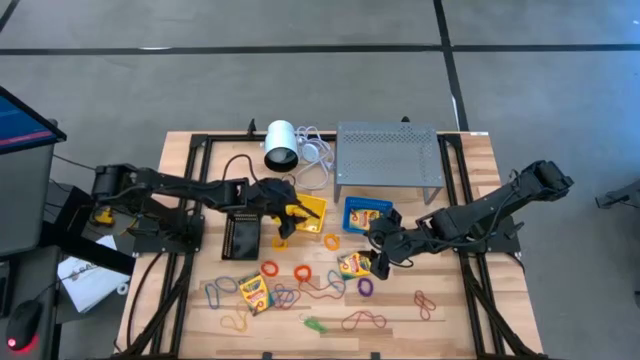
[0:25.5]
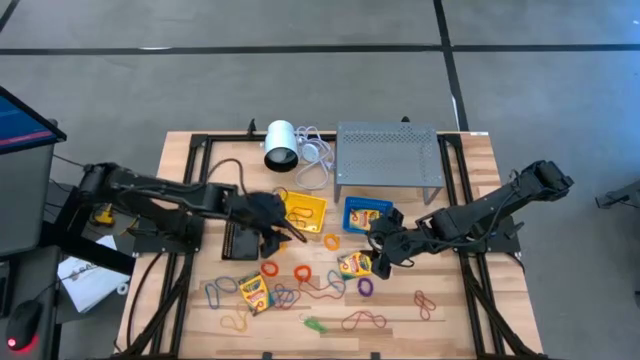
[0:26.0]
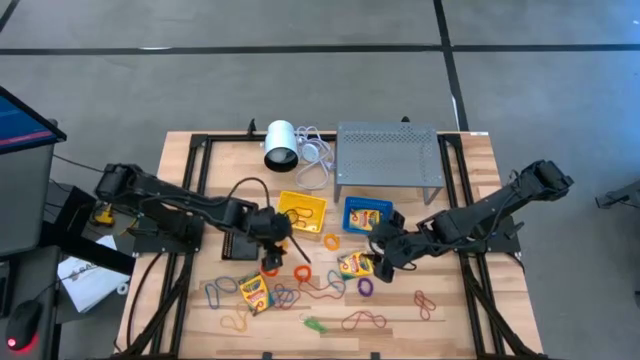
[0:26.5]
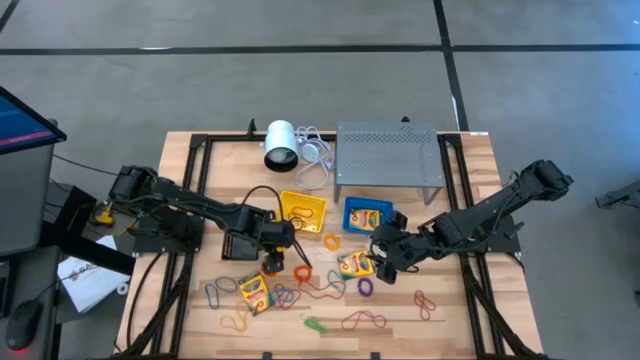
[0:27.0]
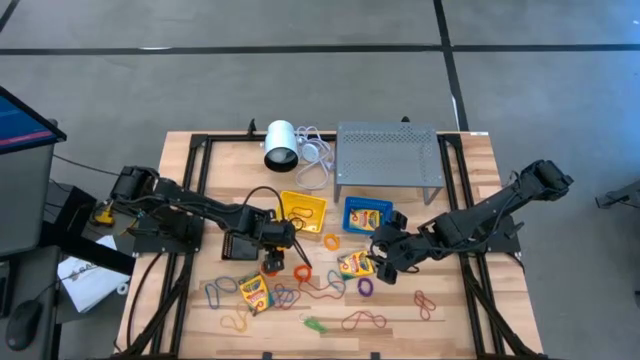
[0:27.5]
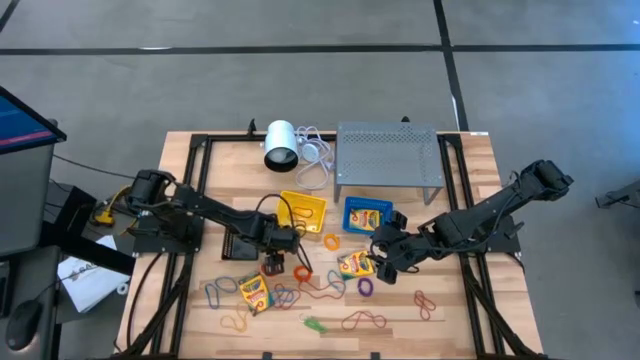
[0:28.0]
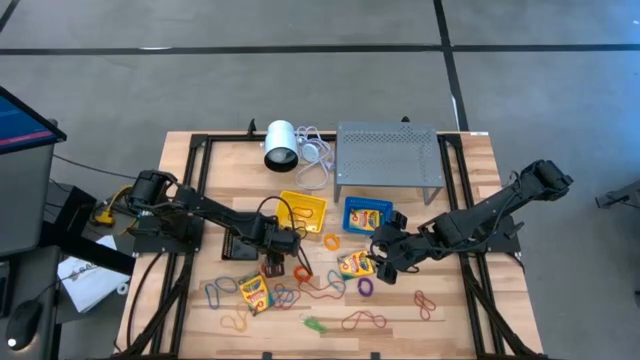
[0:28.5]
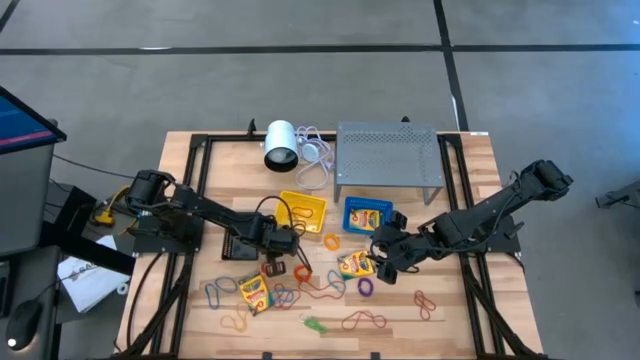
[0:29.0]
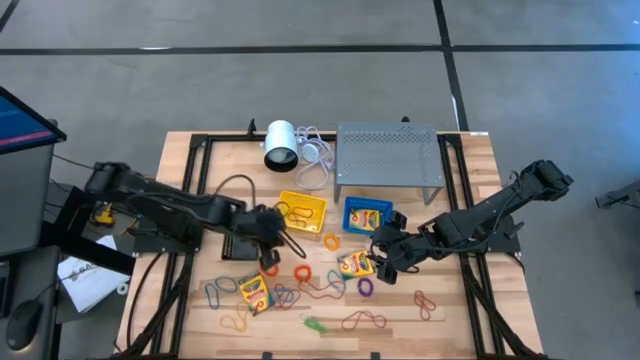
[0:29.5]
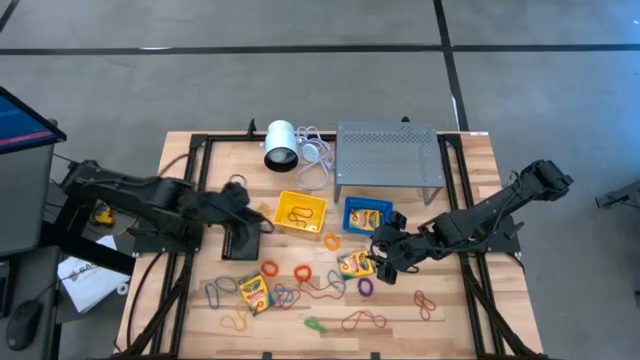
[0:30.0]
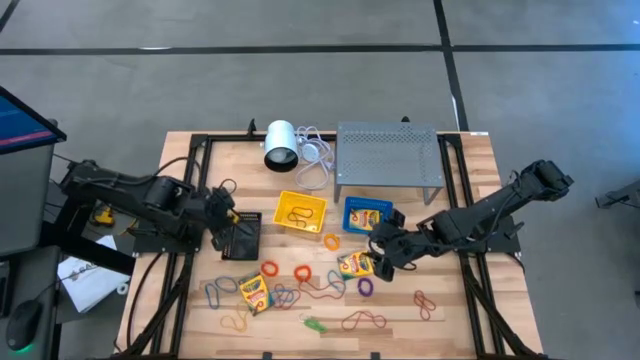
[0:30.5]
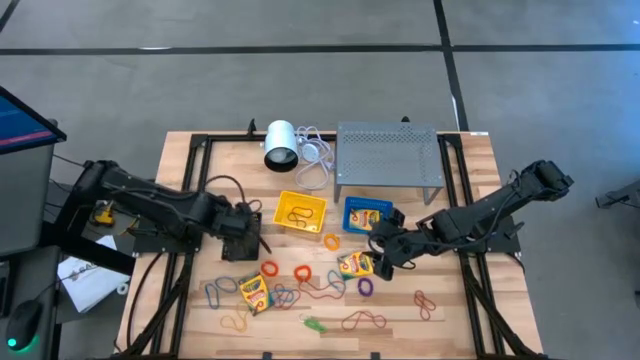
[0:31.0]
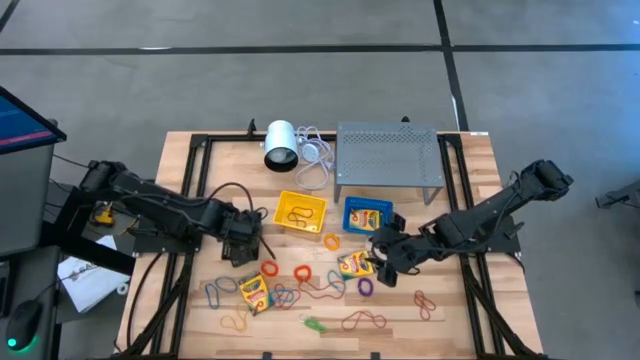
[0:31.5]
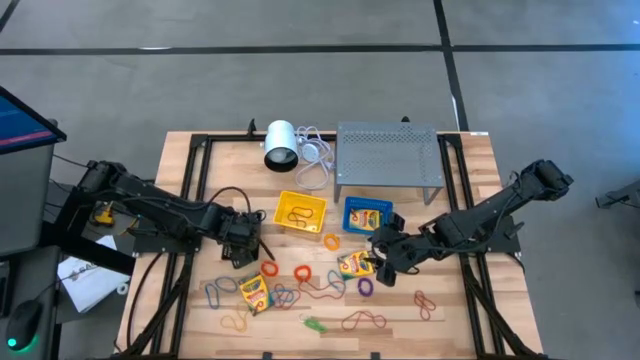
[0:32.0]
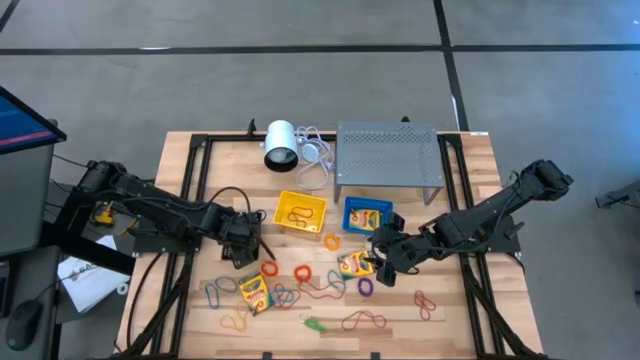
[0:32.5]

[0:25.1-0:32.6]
Task: Pick & Place Office Desk Supplies
Put the right yellow spring keychain into the black bin

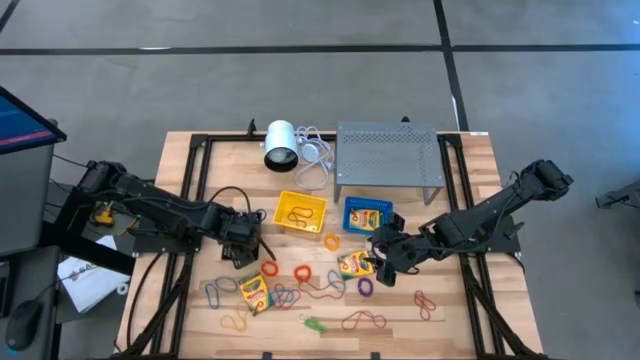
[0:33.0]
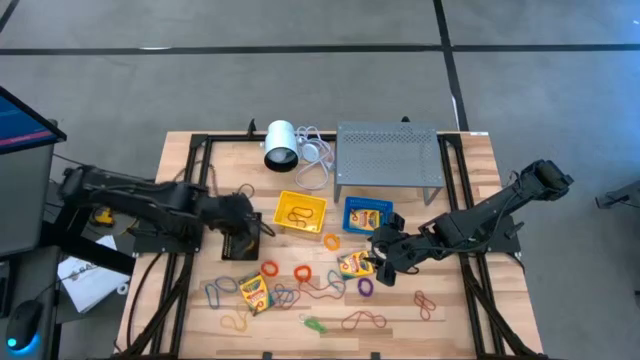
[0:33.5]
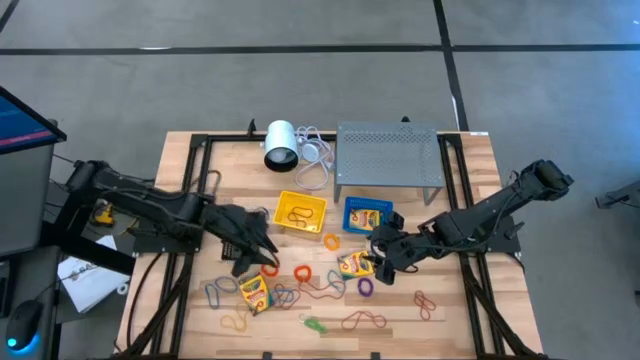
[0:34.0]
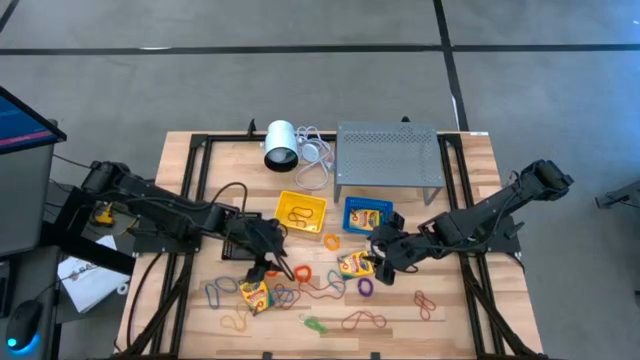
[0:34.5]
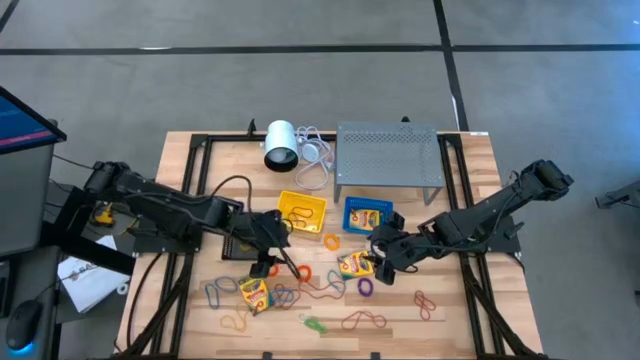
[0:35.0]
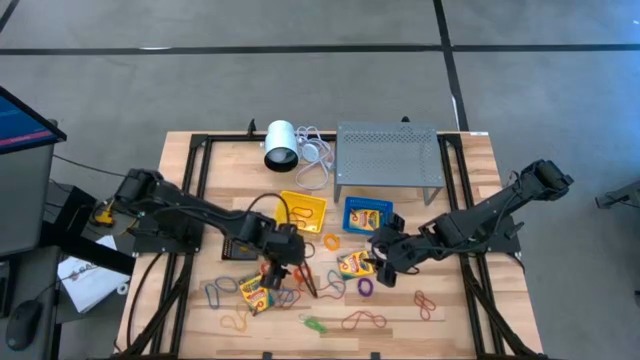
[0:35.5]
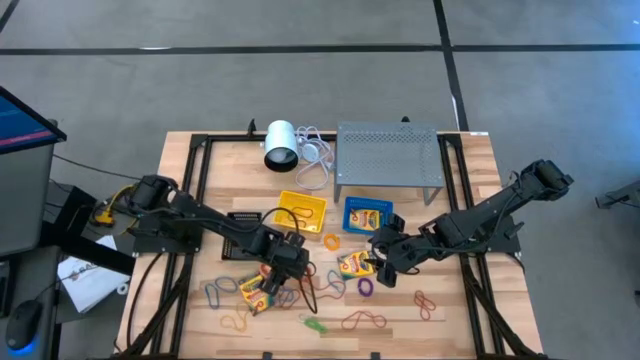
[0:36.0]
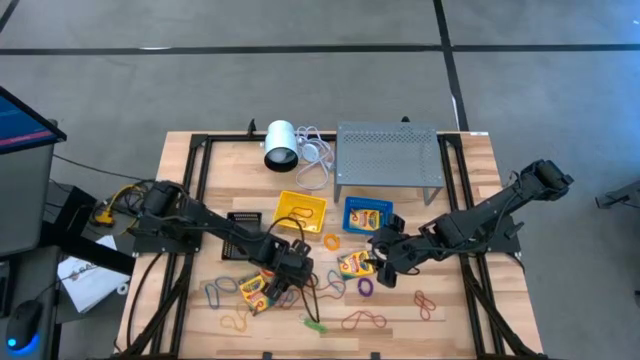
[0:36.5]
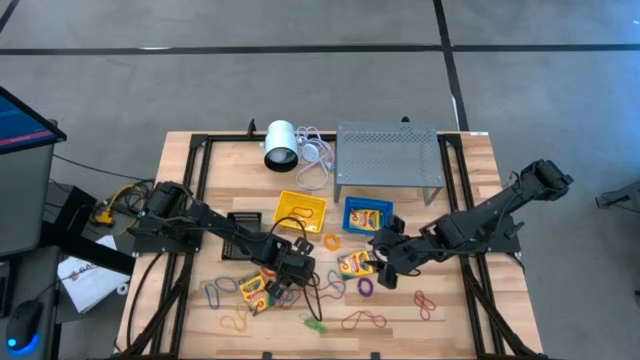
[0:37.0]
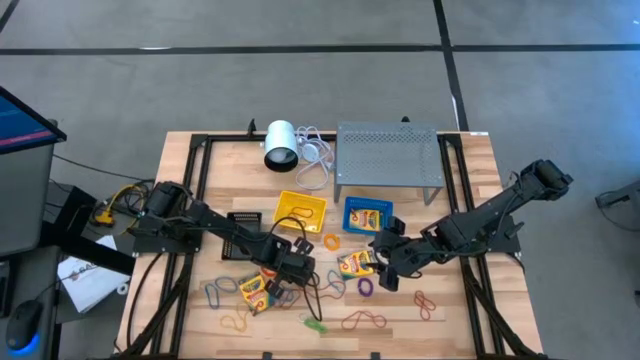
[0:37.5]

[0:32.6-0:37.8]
Put the right orange spring keychain into the black bin

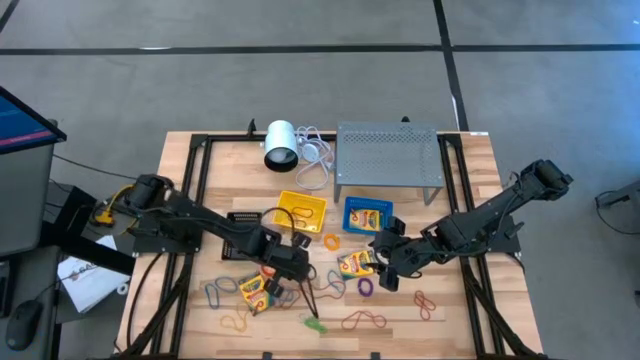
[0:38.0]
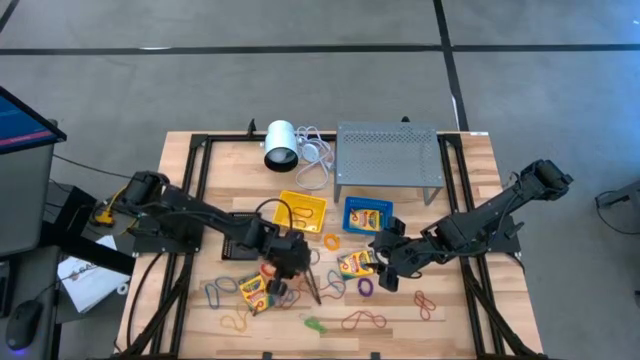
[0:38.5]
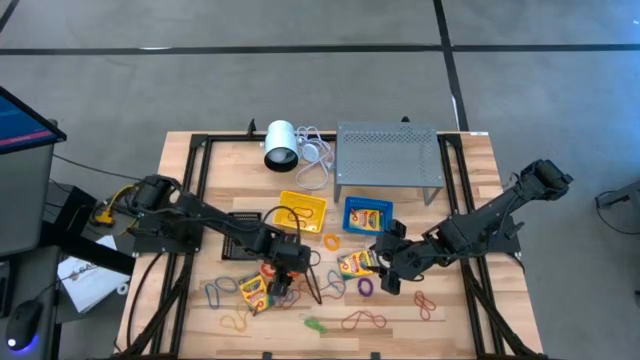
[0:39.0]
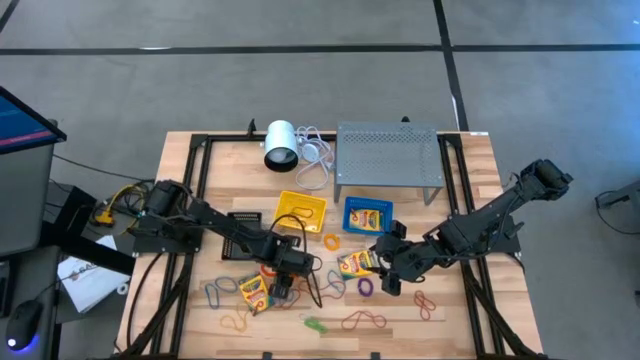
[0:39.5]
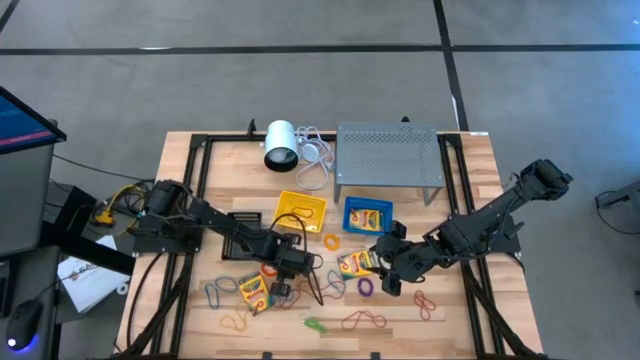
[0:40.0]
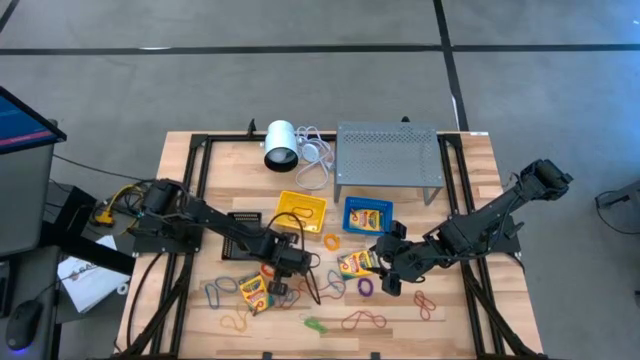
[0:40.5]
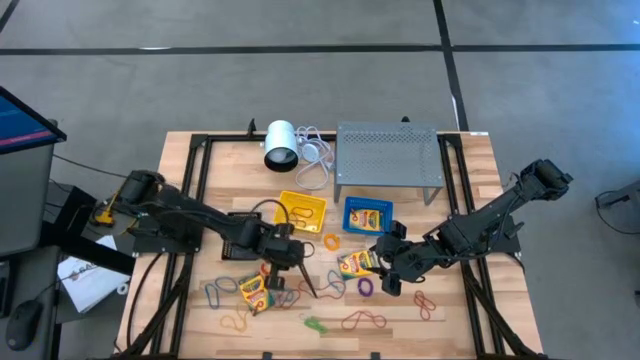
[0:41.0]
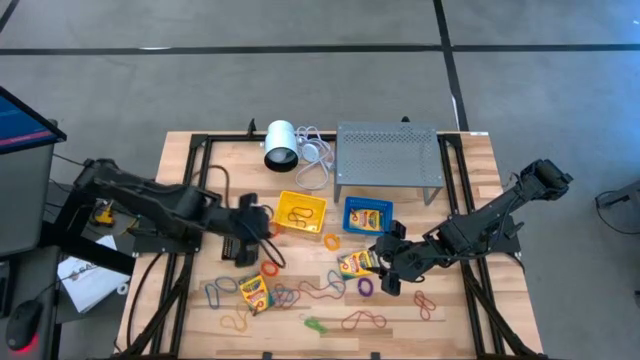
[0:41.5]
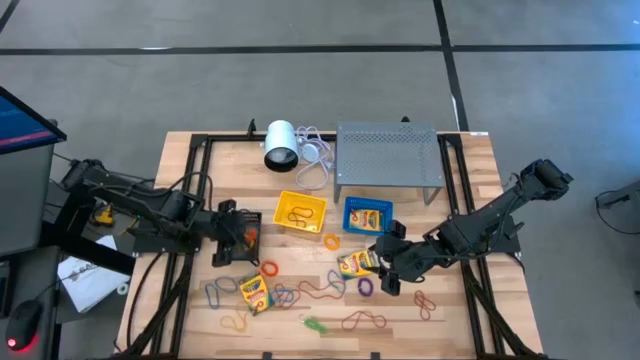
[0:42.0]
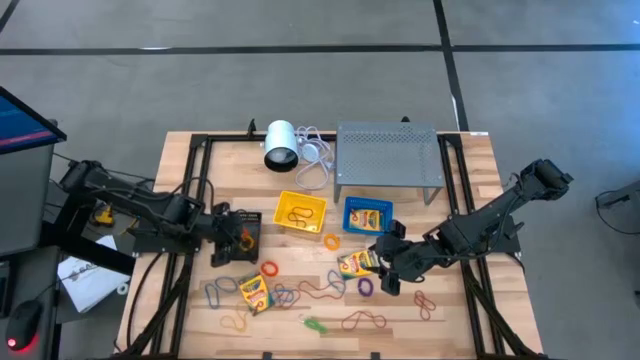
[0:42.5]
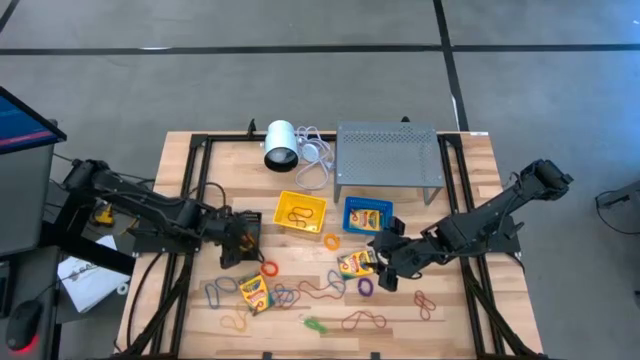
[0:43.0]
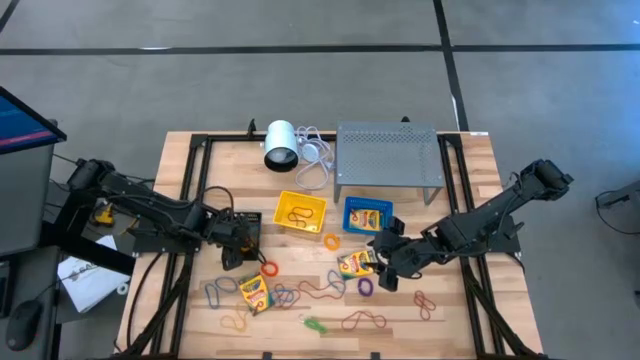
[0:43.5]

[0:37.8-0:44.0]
Put the right orange spring keychain into the black bin

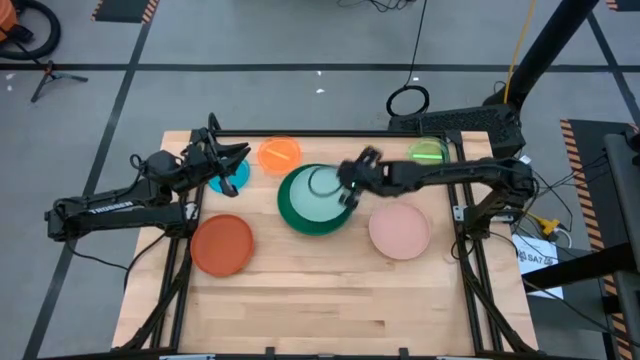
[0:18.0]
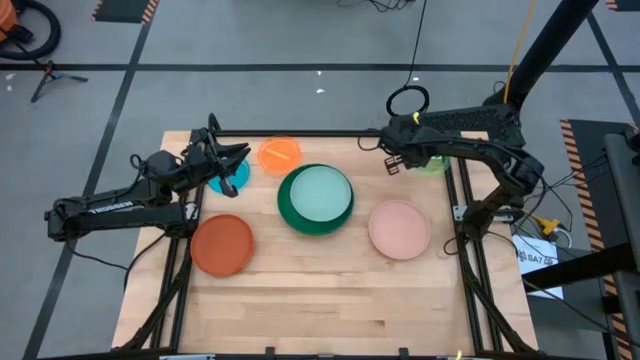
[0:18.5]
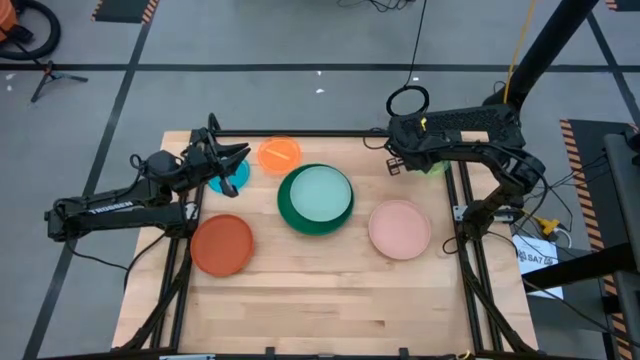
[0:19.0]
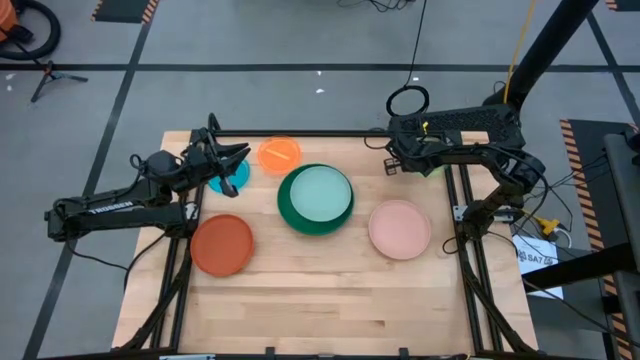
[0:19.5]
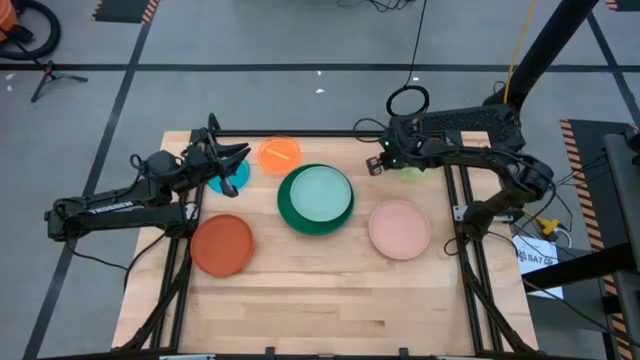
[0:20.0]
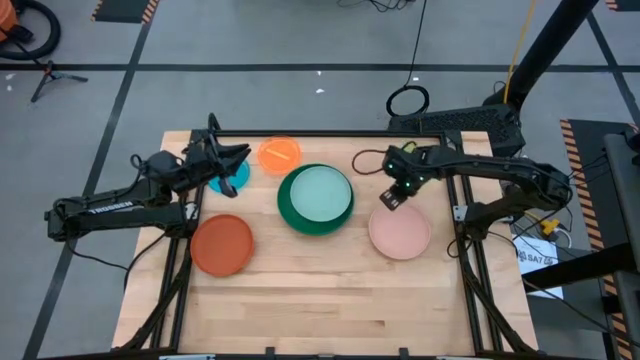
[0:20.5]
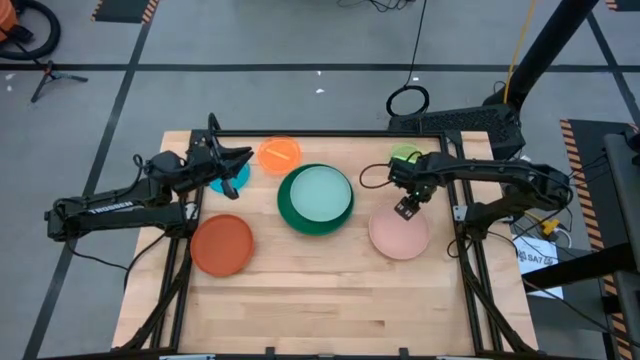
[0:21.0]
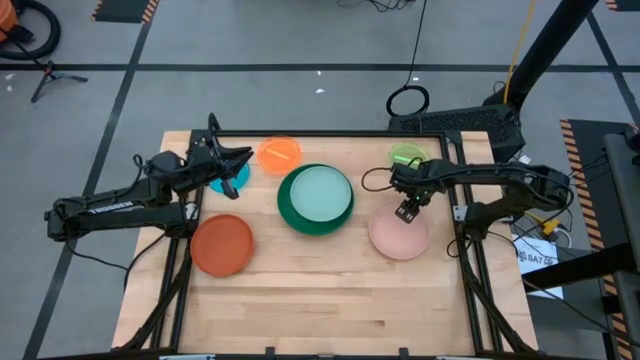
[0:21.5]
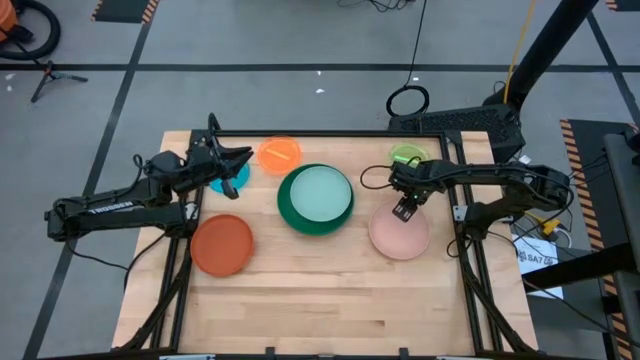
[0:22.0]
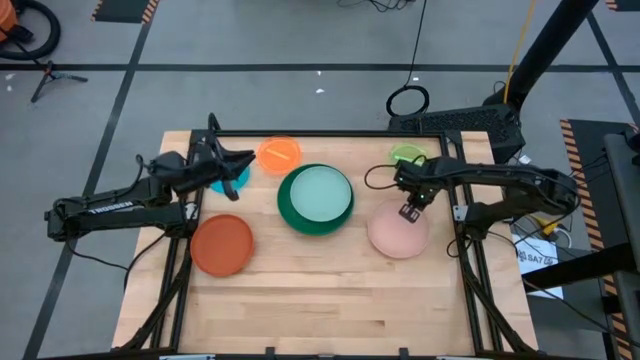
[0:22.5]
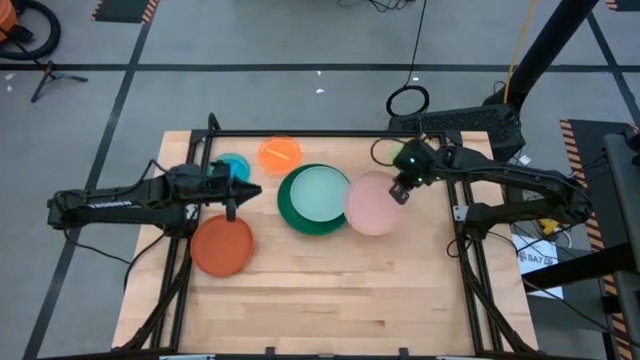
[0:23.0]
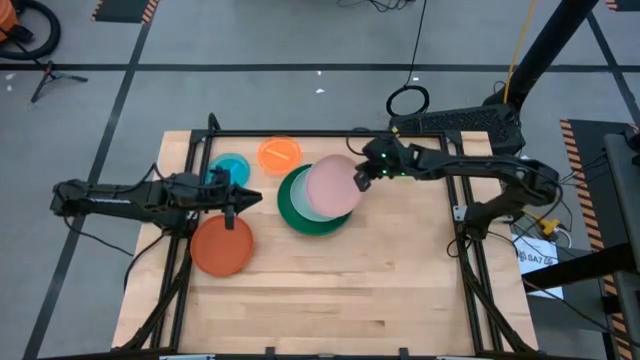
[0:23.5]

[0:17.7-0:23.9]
Task: Stack plastic plates
Stack the light orange plate on top of the the light blue plate
